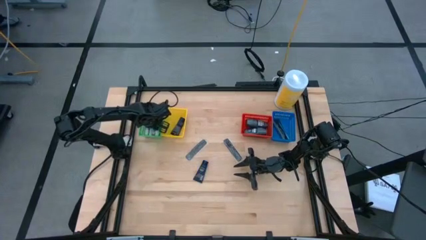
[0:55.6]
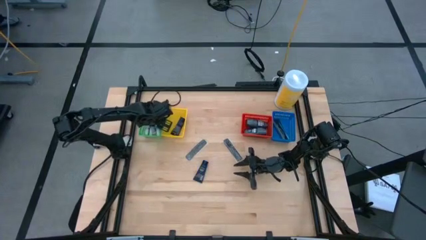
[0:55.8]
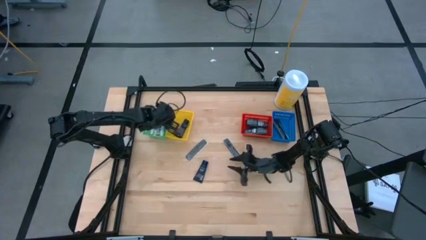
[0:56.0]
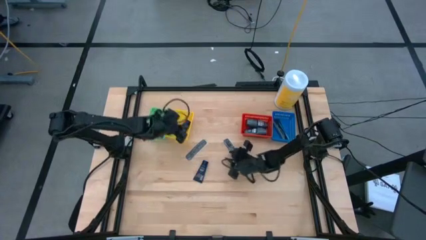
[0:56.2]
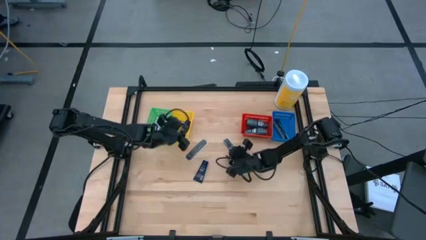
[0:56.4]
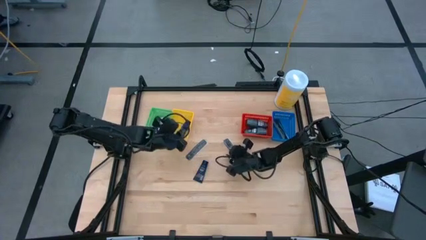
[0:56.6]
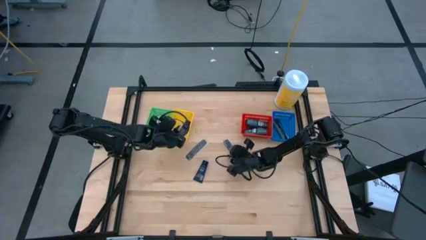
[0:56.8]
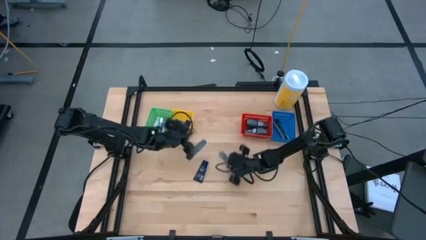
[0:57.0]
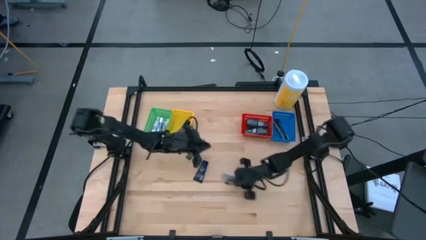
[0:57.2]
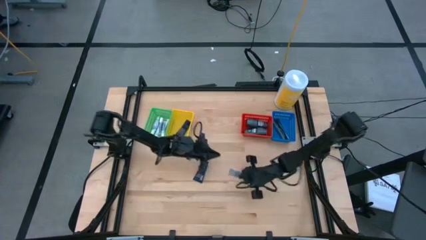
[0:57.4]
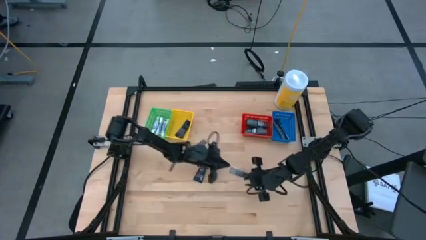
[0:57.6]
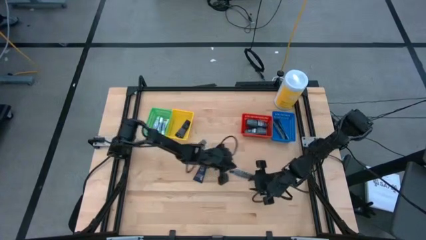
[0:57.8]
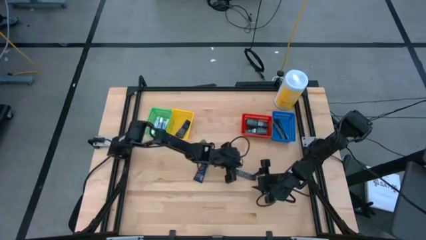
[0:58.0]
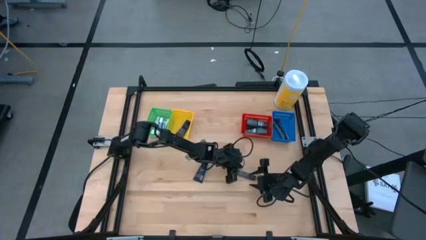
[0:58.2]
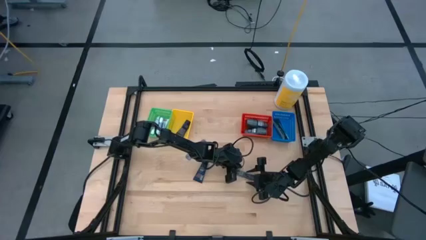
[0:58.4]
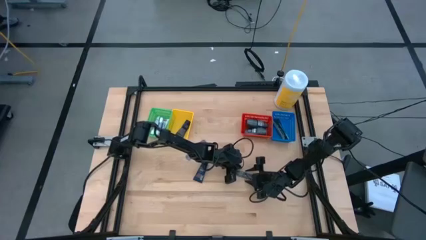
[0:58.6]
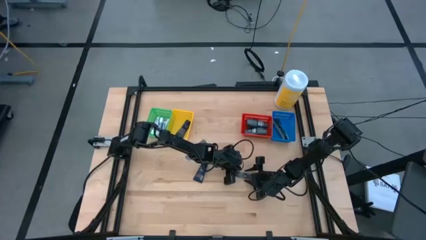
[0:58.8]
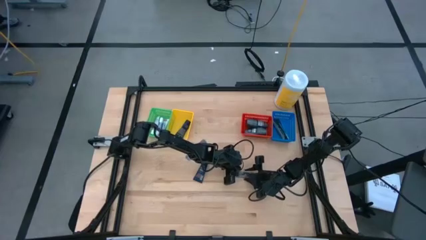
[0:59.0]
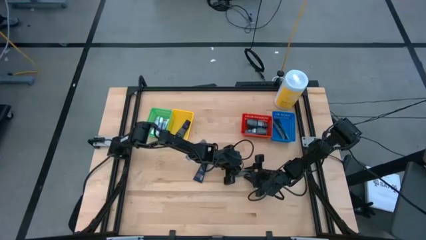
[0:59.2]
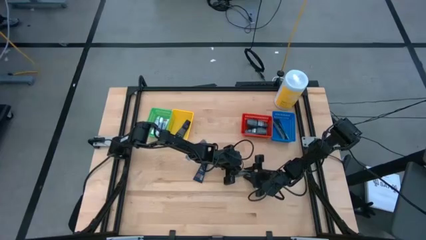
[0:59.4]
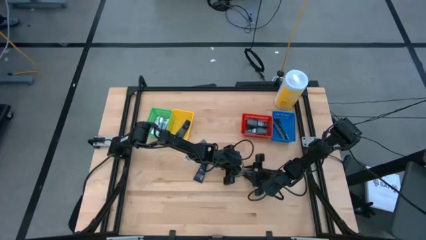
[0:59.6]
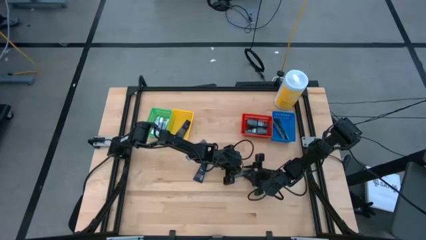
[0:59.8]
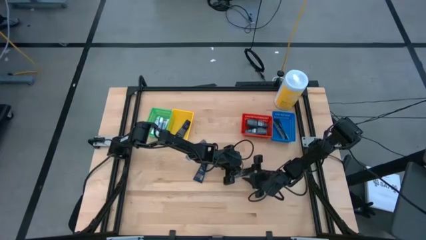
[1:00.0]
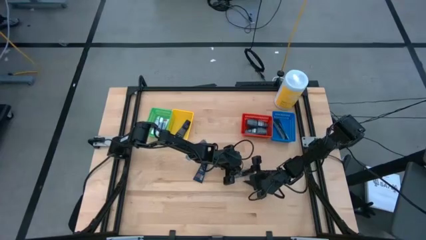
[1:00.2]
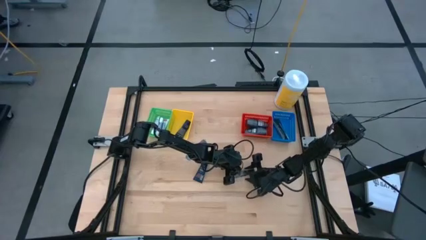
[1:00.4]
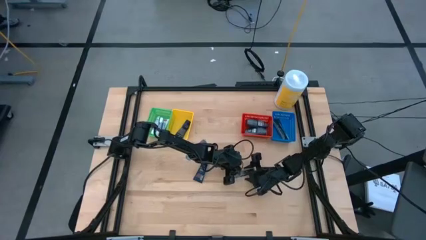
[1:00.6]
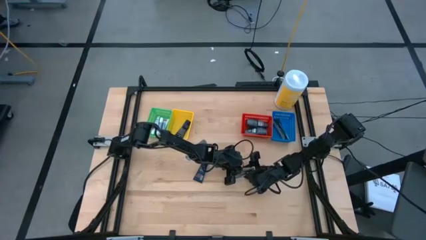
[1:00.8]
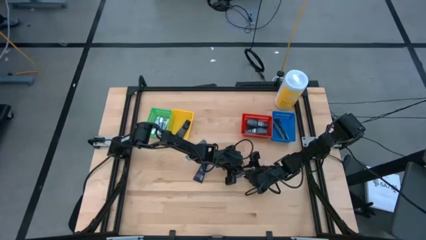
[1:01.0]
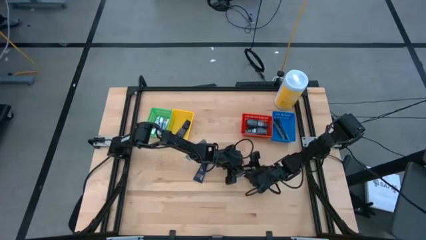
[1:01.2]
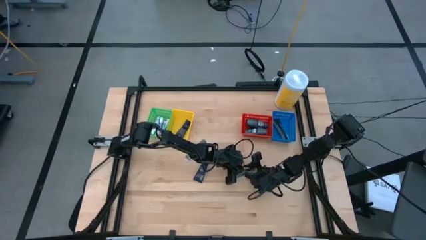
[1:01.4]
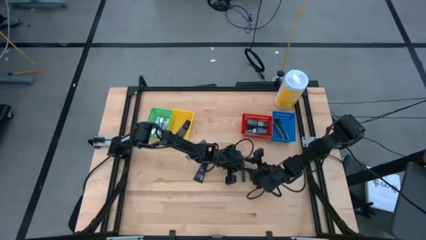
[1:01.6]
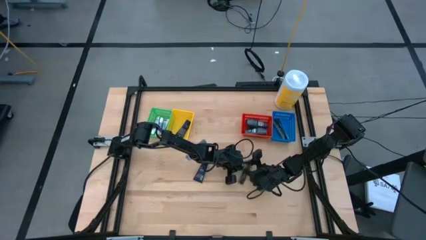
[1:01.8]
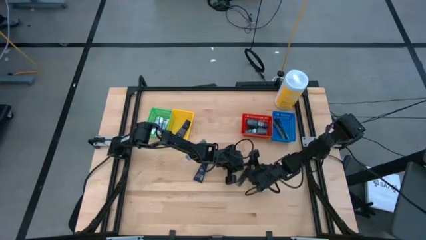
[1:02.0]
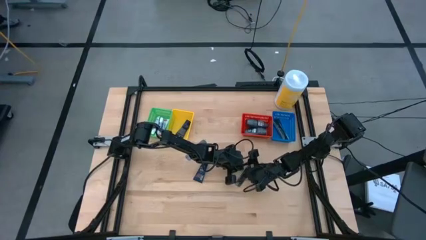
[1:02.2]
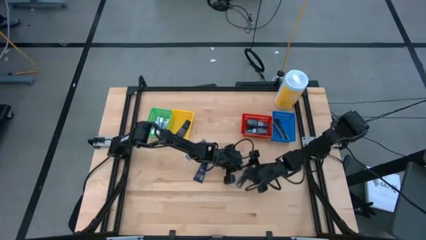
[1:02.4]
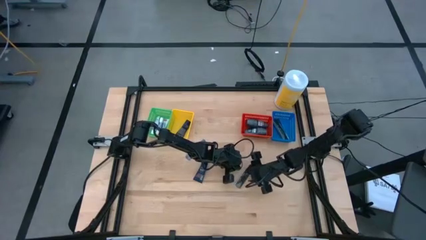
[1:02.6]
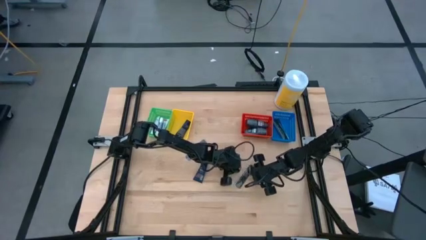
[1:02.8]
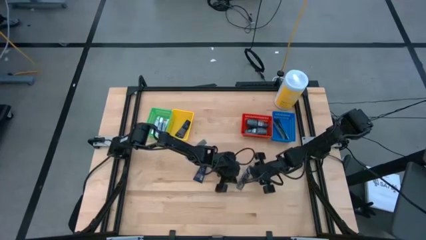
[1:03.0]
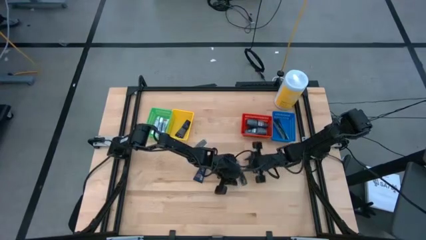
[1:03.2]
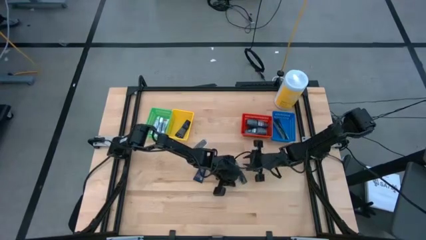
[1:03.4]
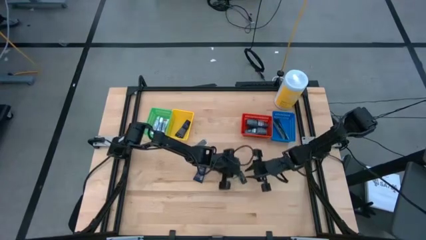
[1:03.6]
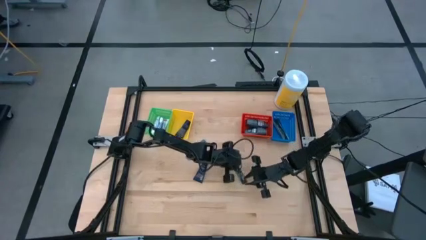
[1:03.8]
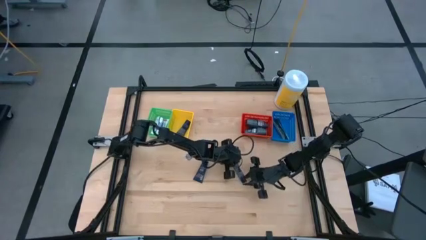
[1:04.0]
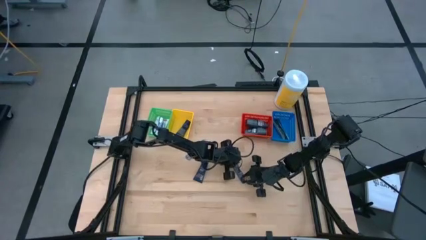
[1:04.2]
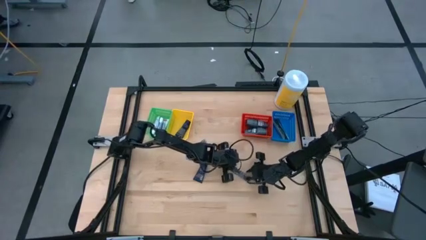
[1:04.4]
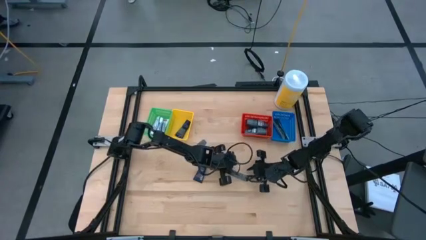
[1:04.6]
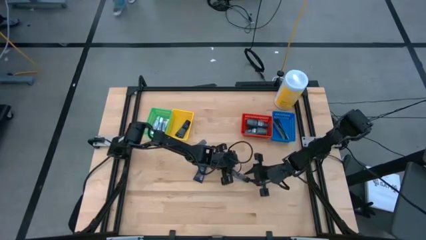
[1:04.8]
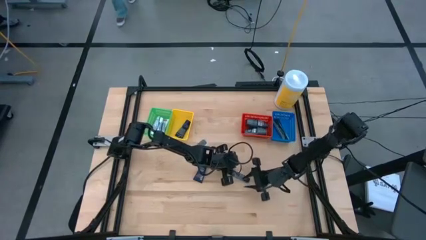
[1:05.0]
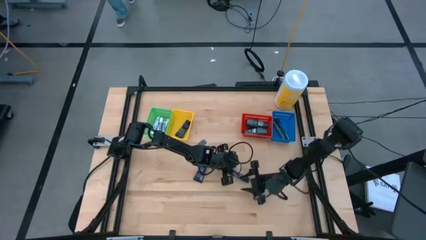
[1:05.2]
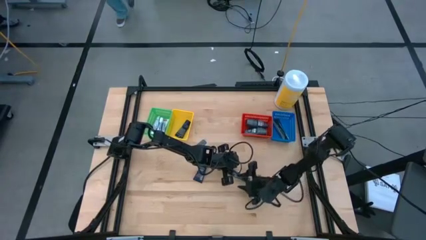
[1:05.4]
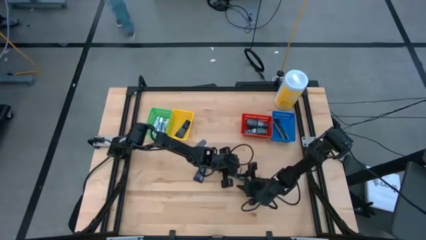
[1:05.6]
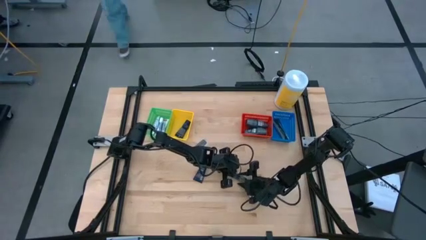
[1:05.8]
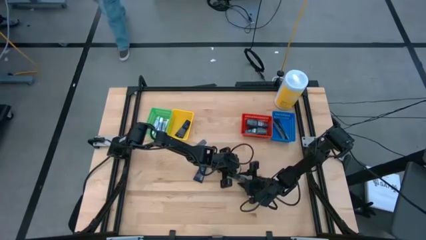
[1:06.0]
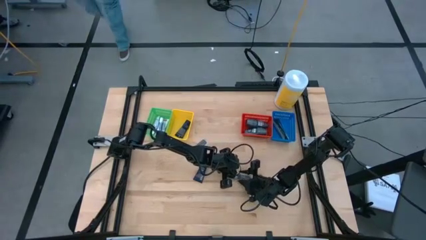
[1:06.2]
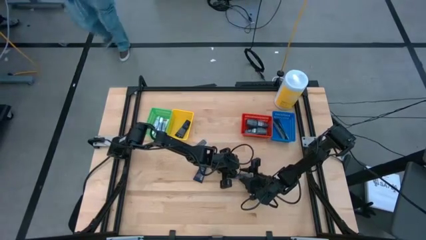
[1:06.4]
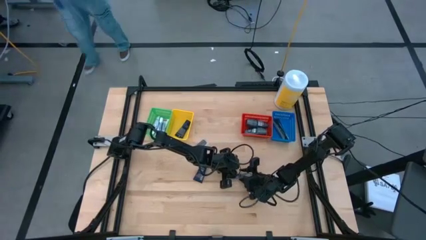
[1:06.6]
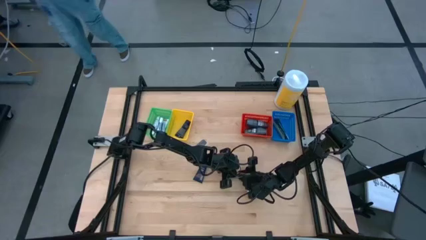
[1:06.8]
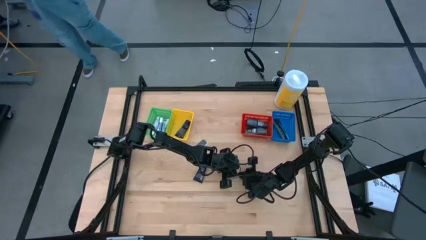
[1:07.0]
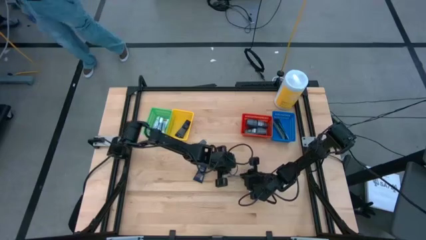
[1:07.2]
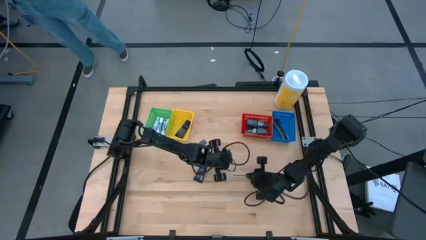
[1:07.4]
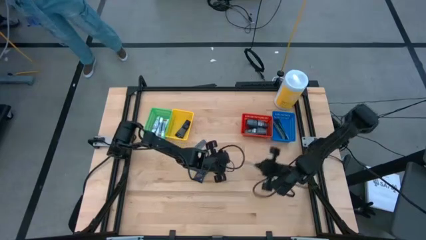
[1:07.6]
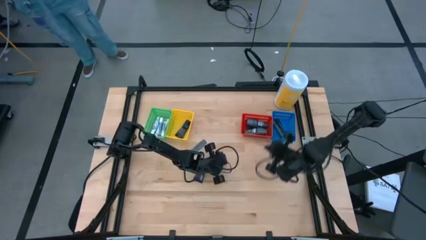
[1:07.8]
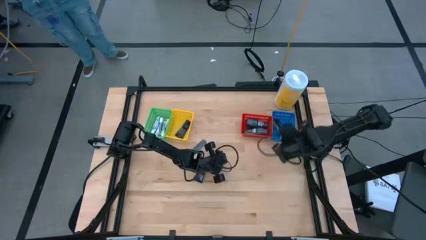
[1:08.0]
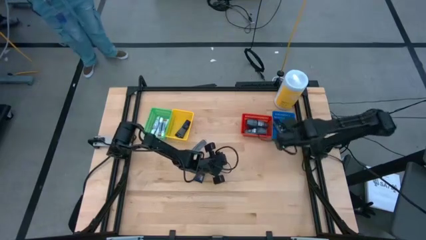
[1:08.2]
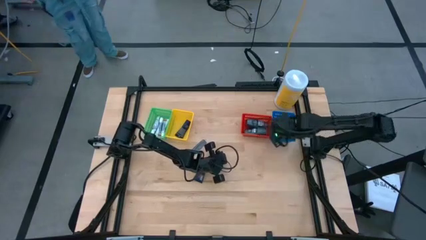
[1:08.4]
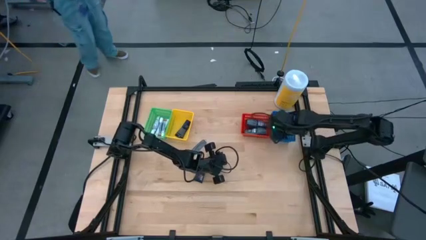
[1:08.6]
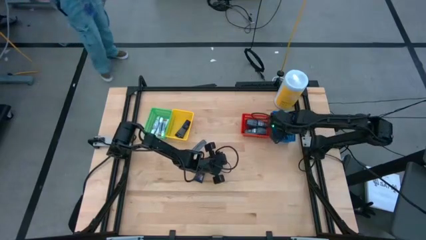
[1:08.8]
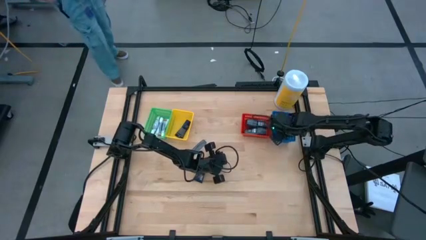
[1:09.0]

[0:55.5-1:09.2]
Task: Pick & Place Travel size toiletries
Put the comb into the blue bin

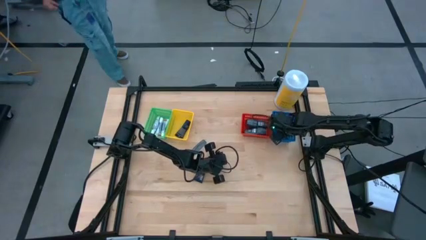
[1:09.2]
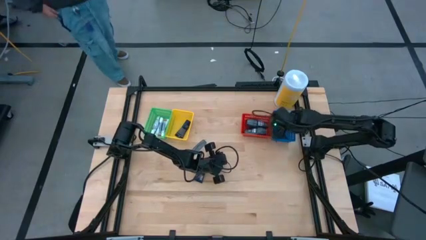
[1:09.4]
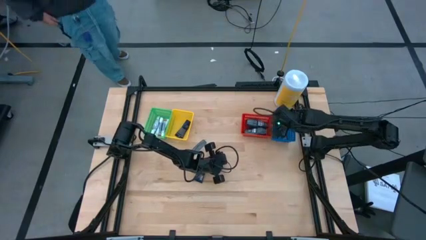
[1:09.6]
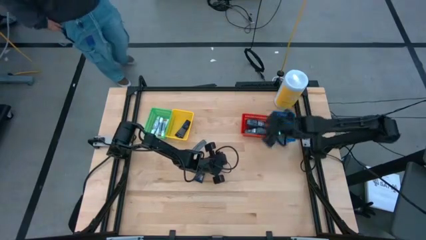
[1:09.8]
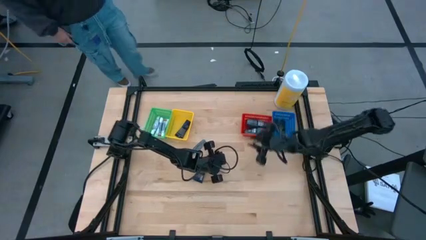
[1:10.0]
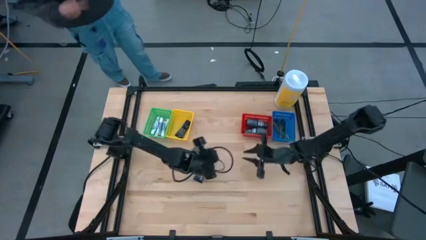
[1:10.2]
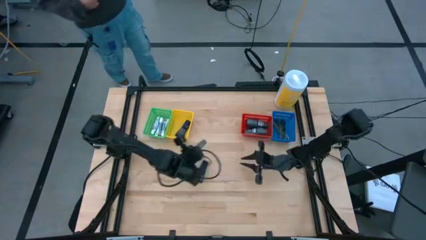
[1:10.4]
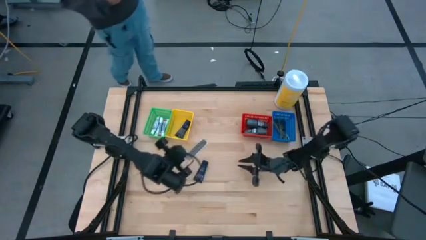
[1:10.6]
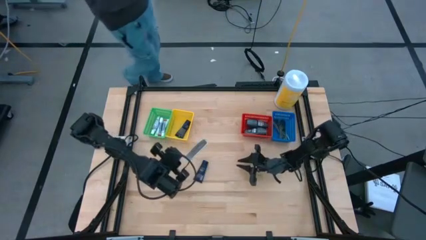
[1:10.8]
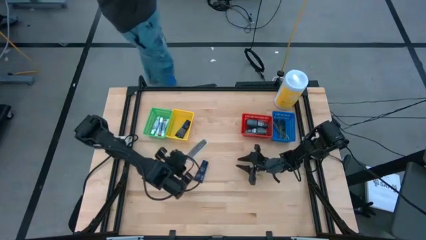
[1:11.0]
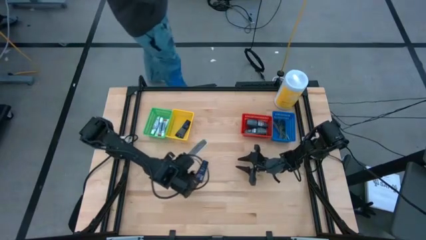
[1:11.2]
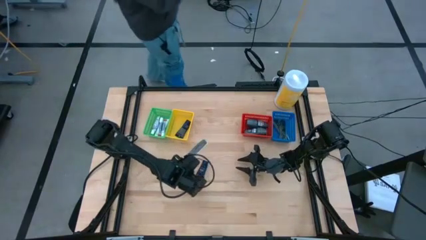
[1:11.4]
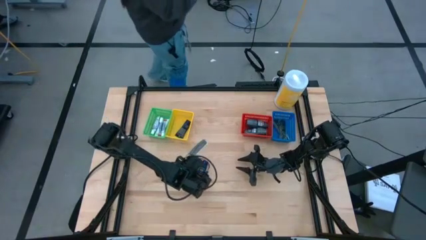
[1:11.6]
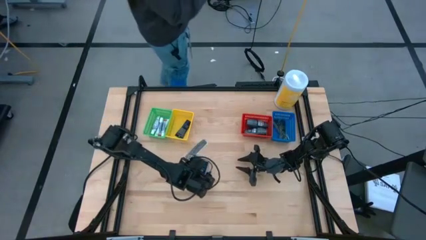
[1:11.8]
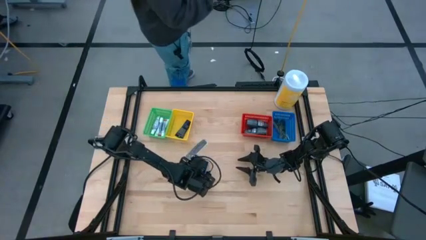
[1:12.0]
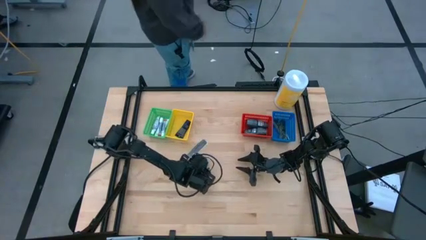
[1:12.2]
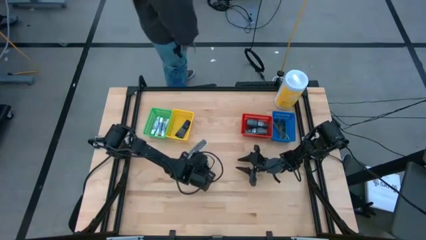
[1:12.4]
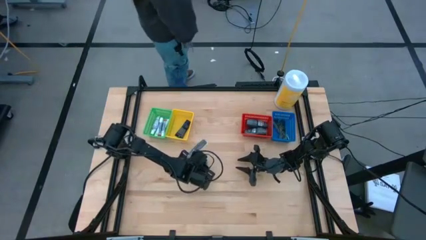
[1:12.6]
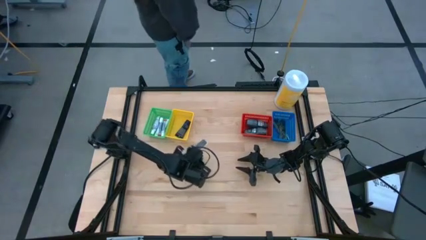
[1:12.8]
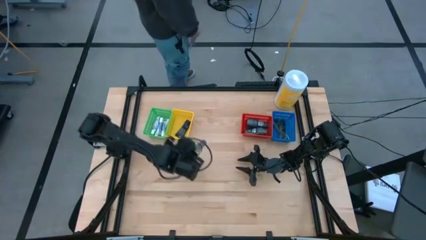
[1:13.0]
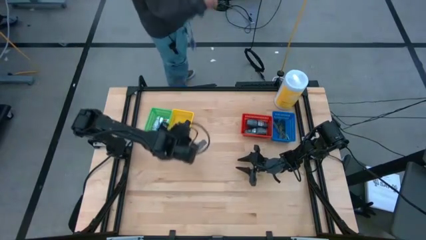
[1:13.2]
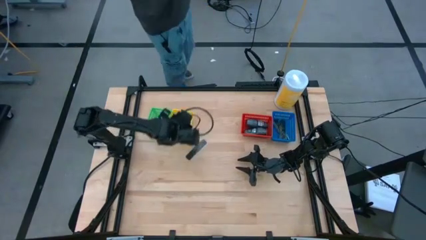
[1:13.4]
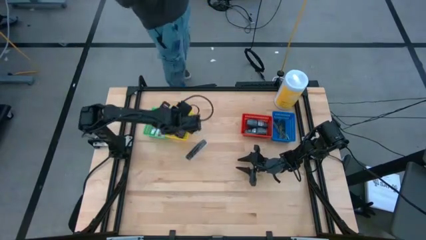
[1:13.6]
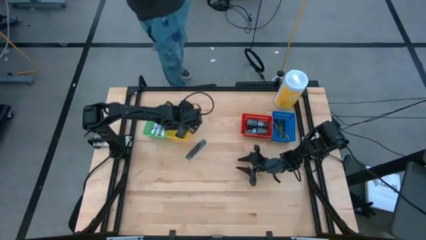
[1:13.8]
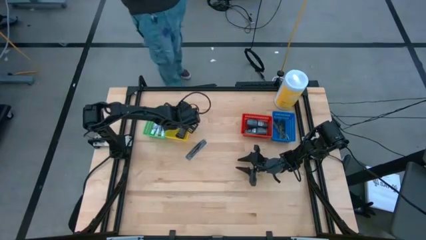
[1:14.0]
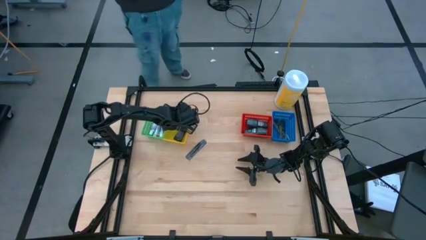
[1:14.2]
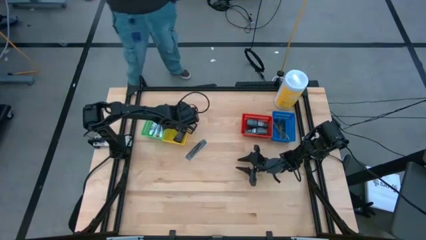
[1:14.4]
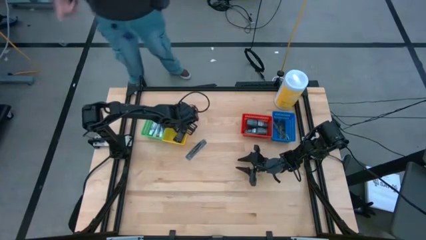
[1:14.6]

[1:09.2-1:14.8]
Put the shave cream into the yellow bin
